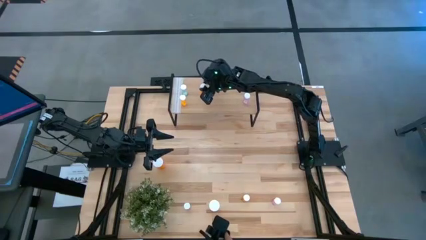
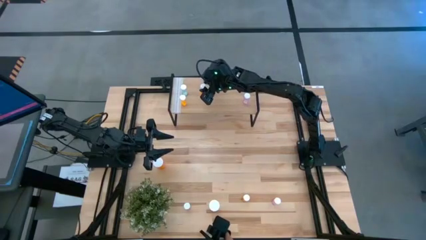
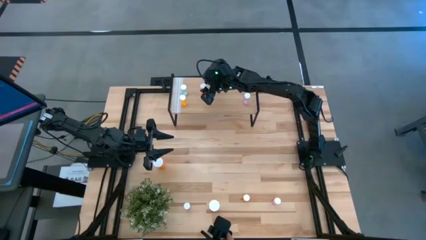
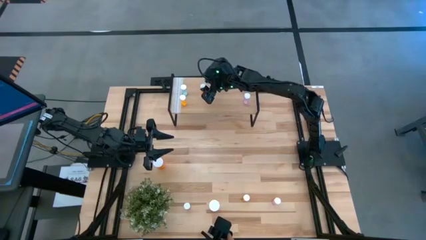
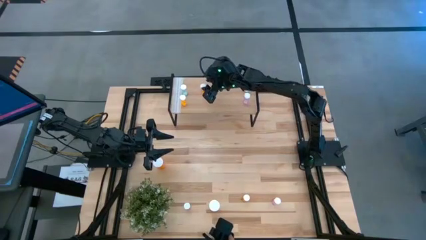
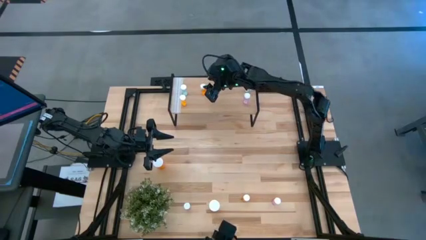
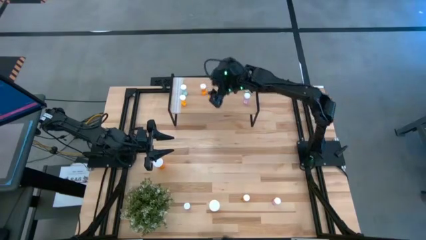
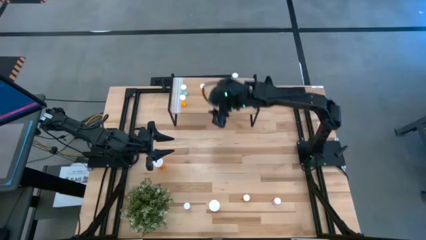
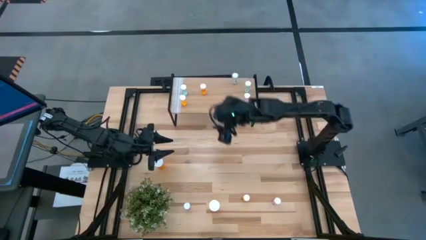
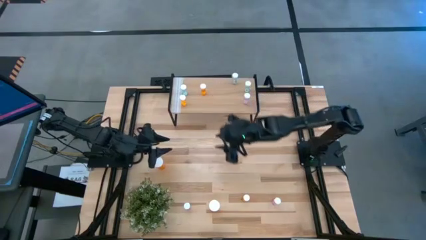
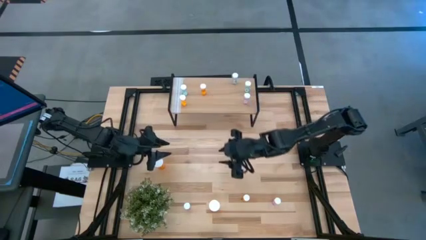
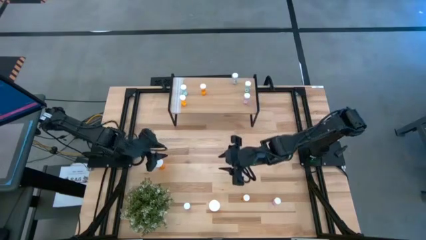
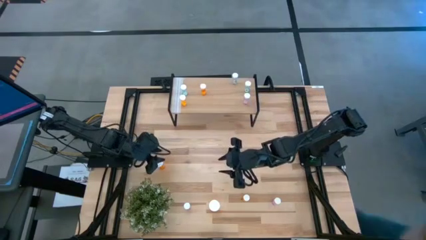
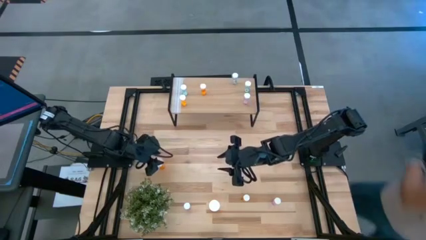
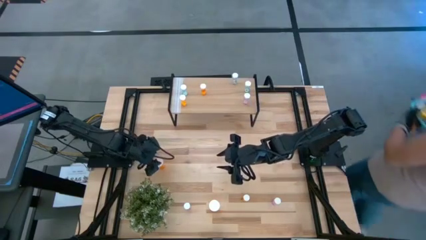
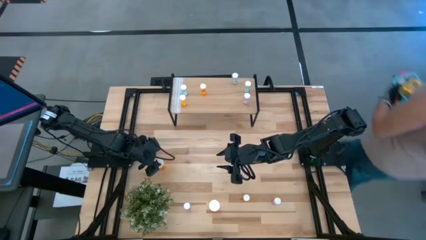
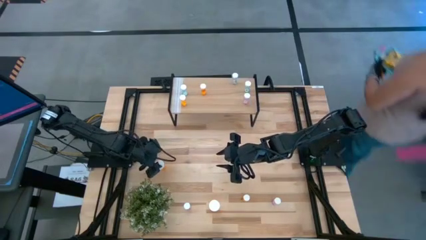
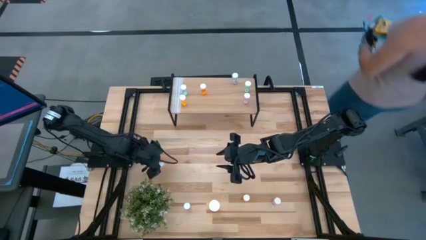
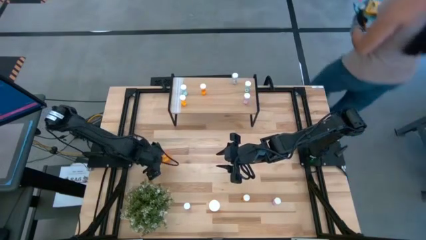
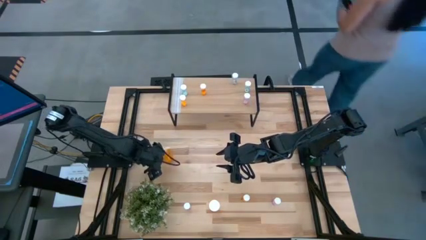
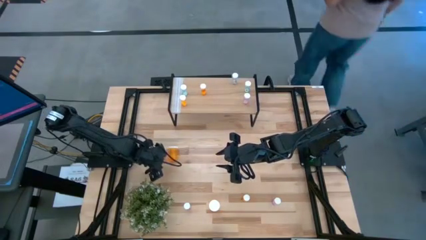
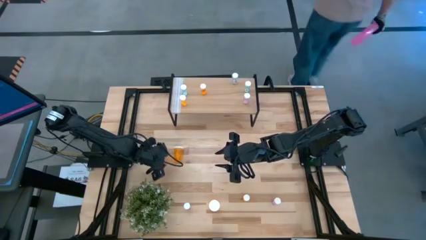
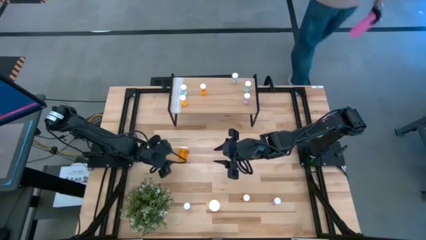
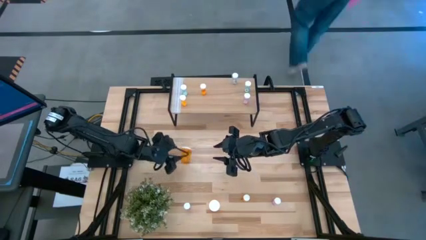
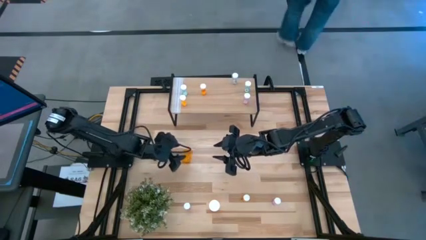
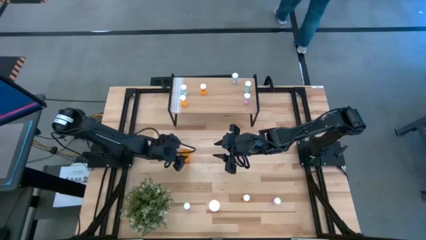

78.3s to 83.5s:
Task: Pick and place medicine bottles onto shelf by color
Put the top large orange bottle on the shelf

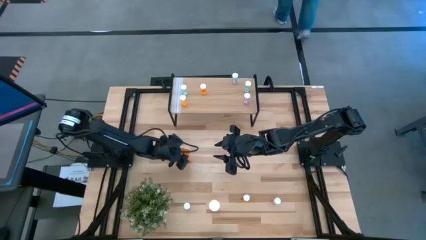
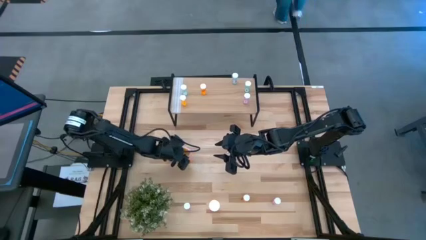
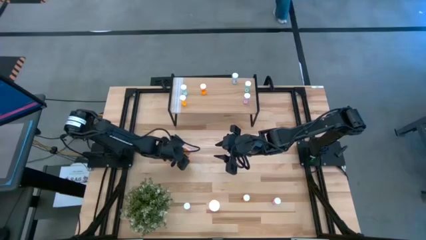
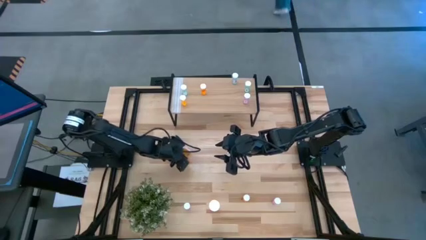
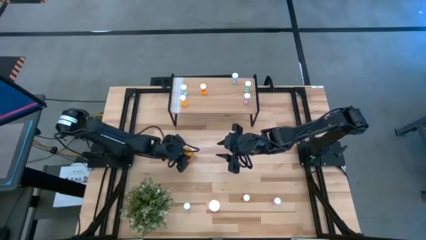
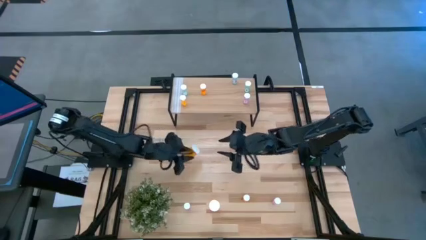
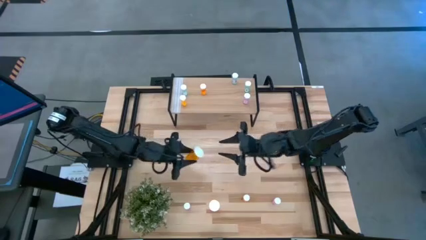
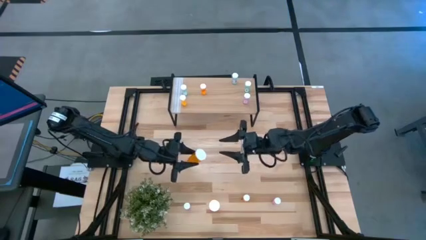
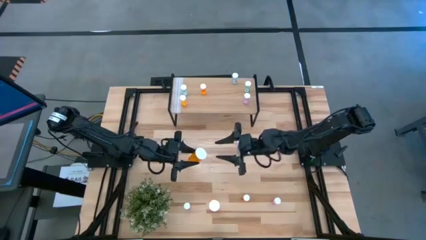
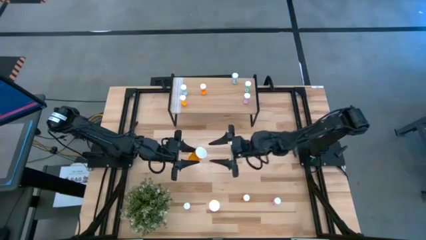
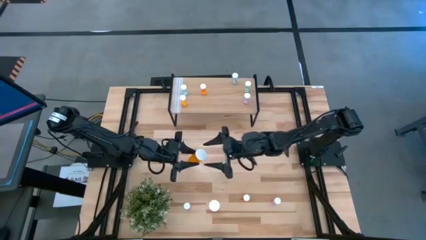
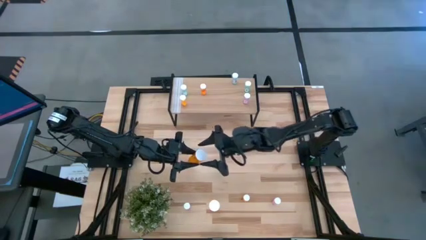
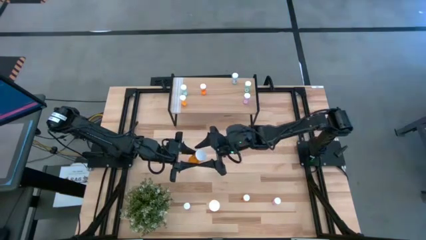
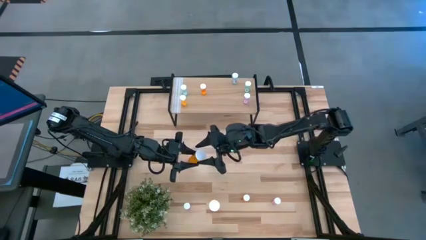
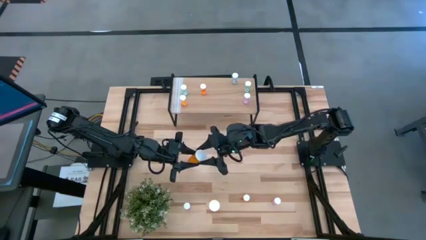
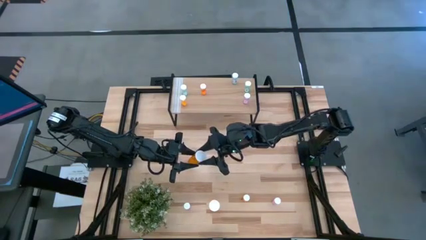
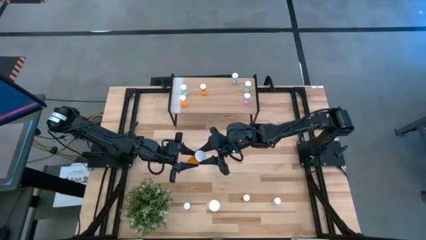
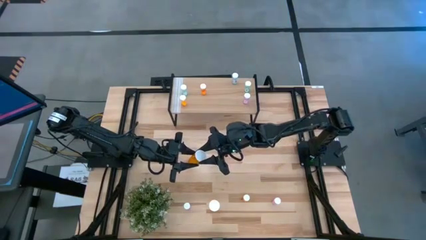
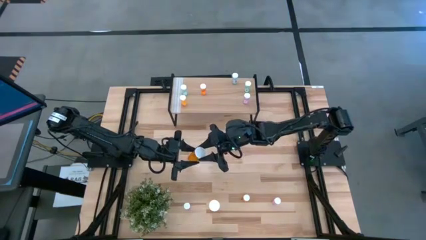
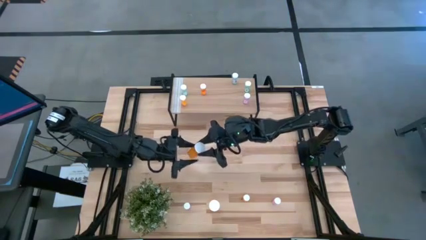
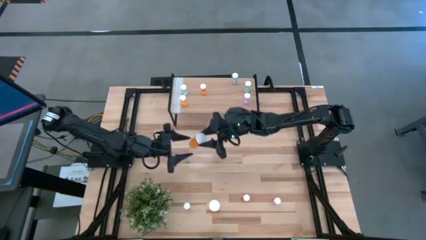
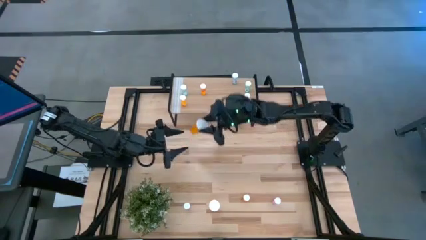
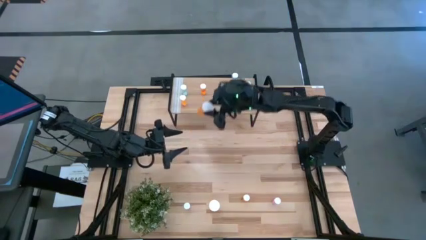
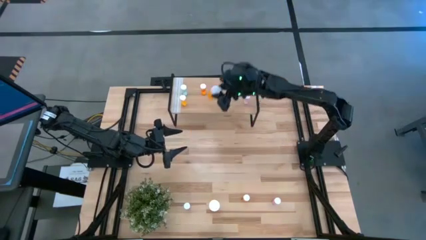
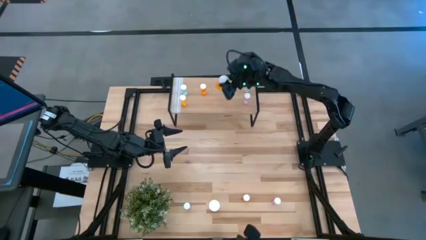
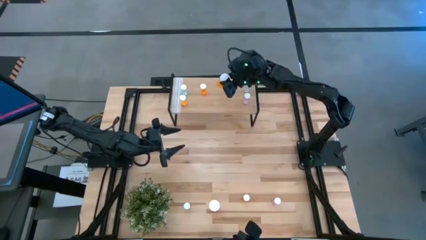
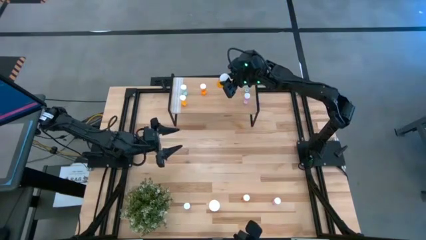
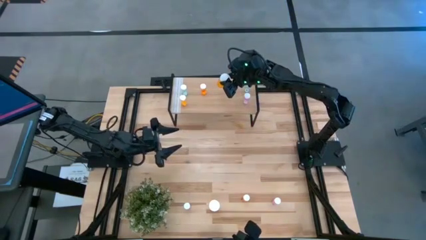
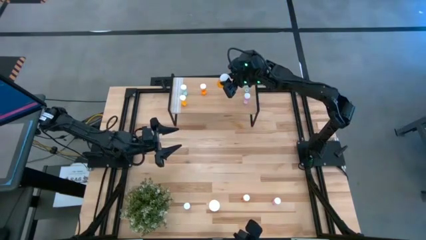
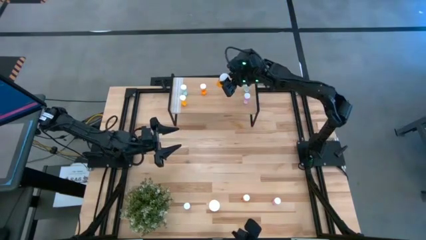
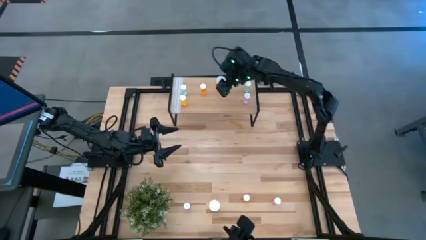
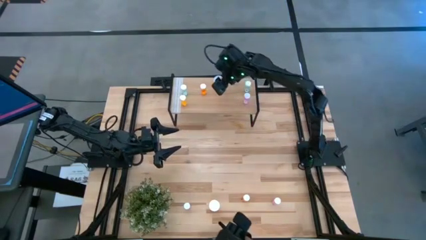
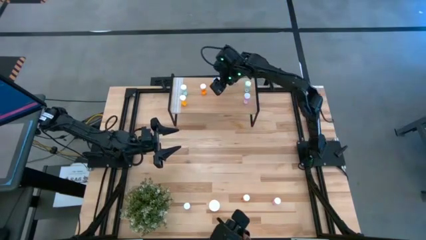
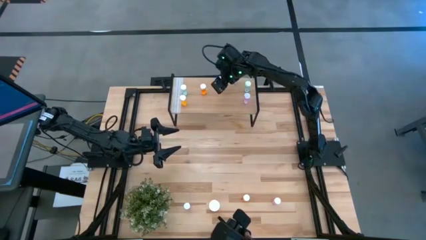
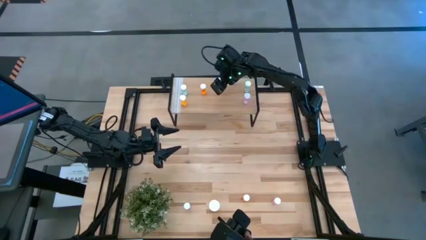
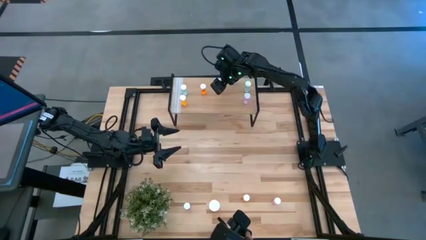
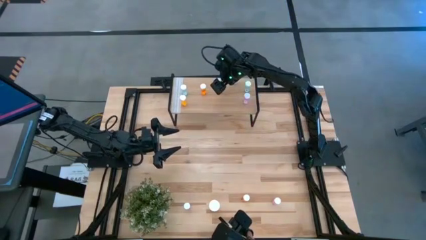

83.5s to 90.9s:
Put the top large orange bottle on the shelf

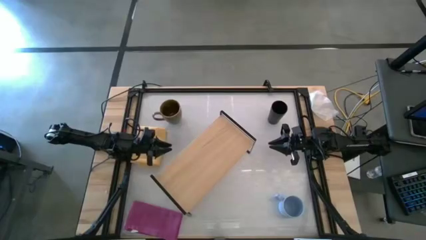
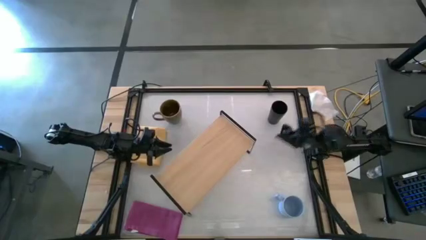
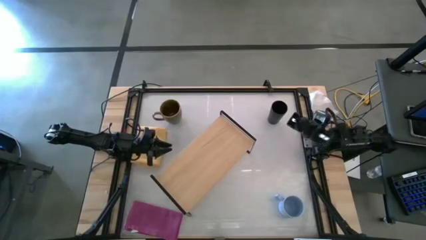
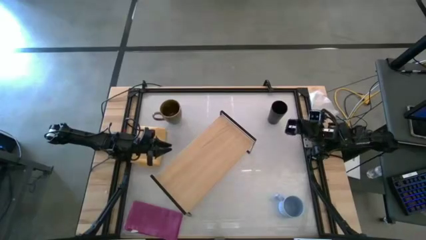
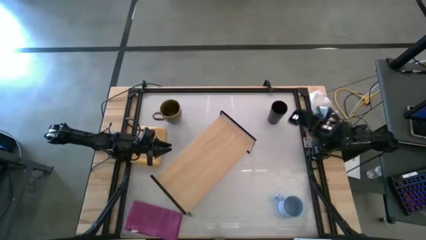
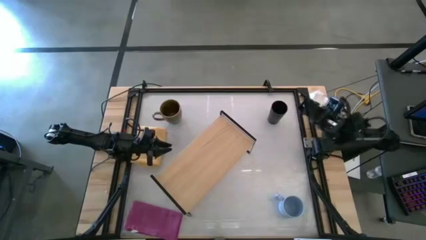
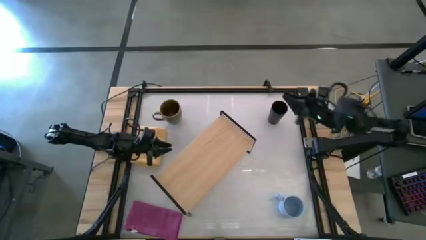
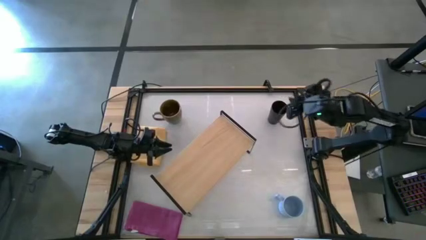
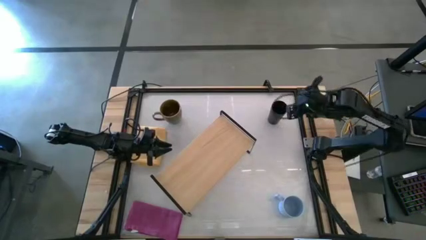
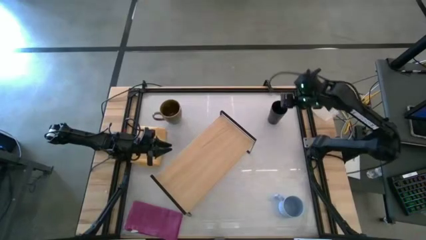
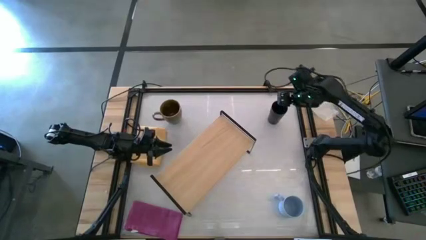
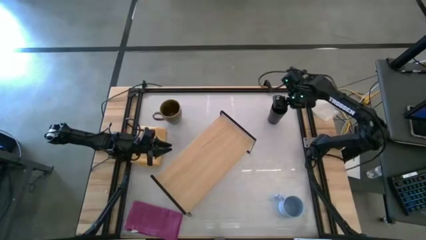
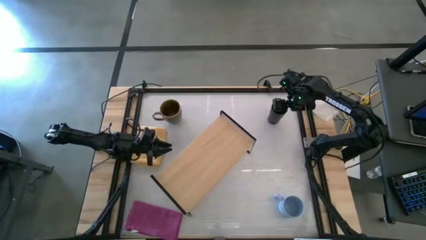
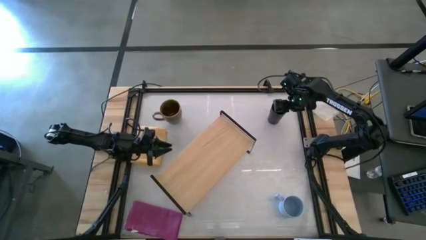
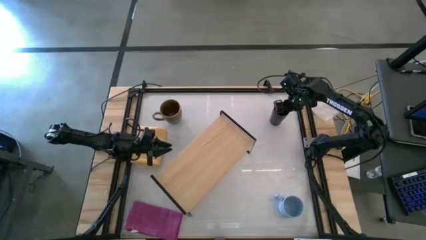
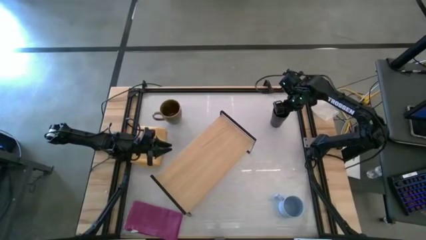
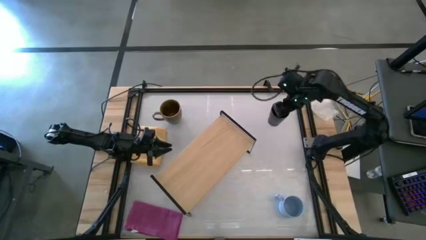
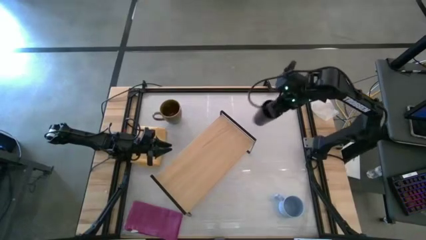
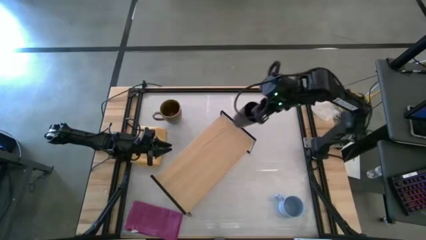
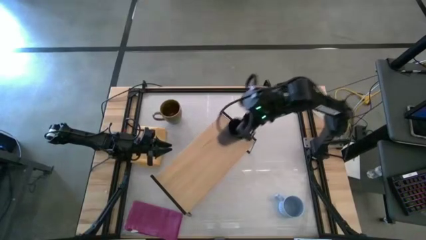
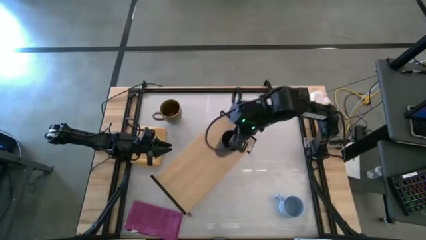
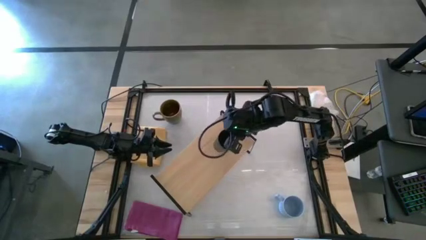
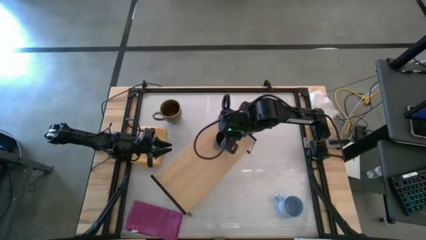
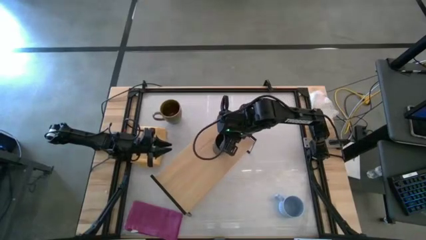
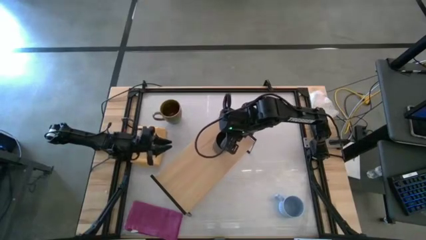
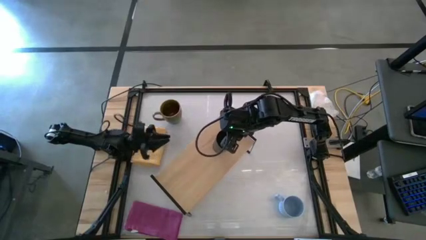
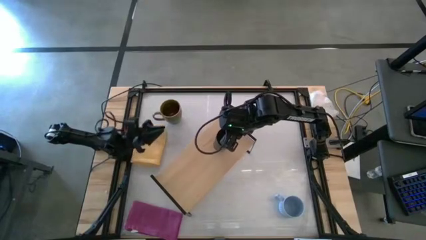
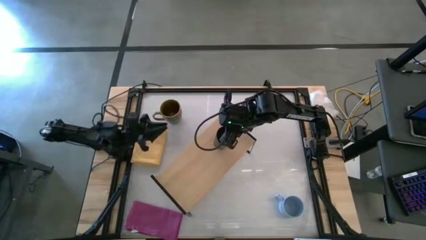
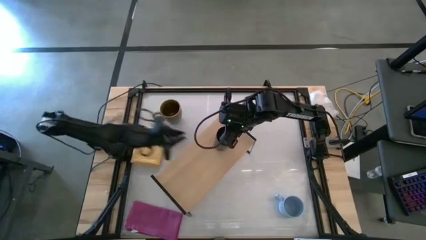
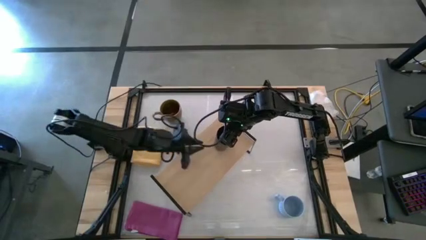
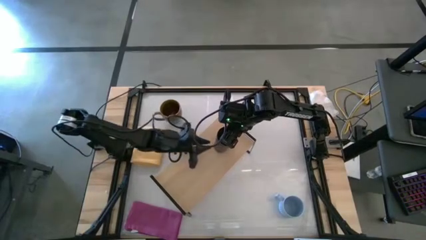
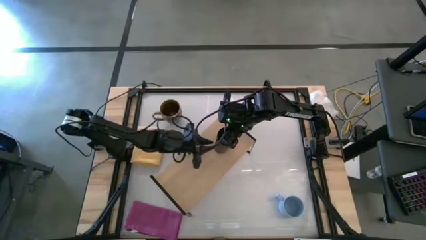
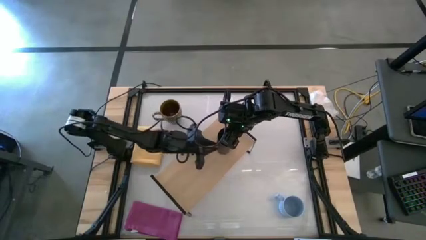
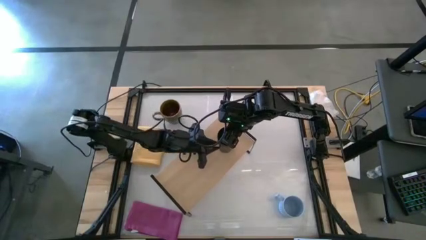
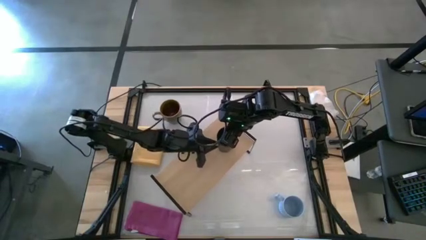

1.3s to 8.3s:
Task: Stack small to large cups/mugs on shelf
Put the black cup on the shelf
